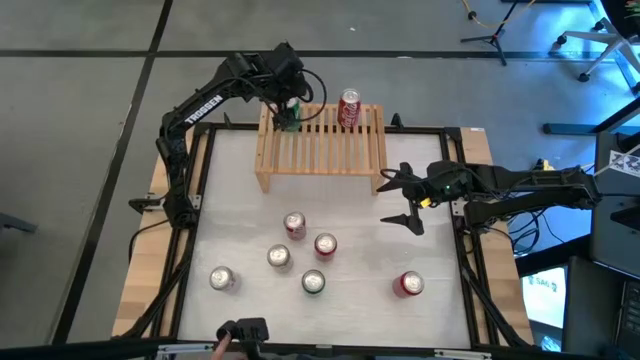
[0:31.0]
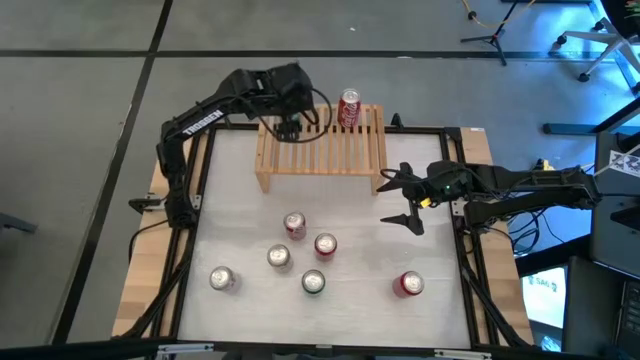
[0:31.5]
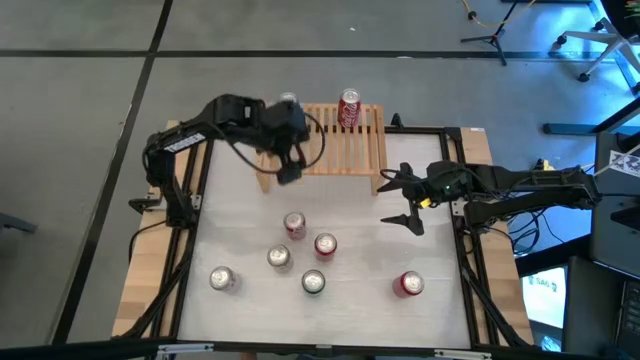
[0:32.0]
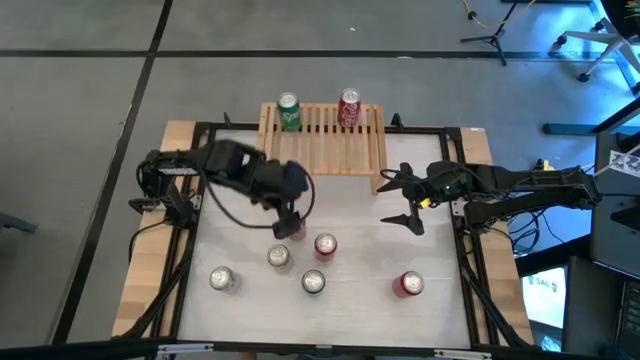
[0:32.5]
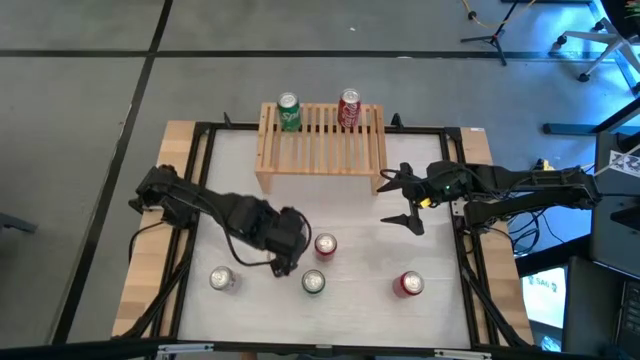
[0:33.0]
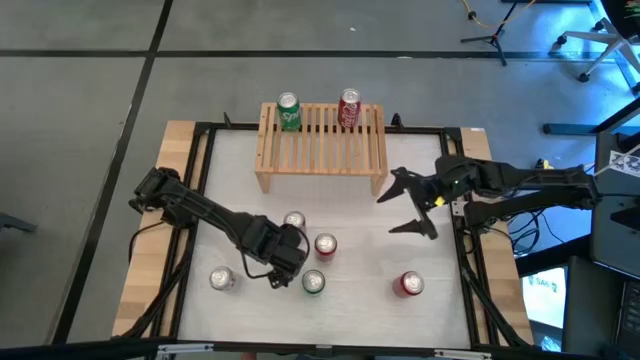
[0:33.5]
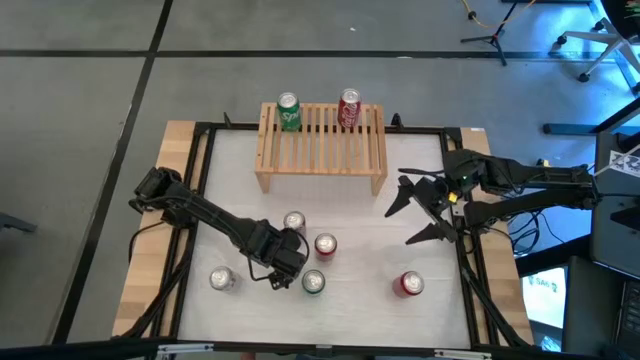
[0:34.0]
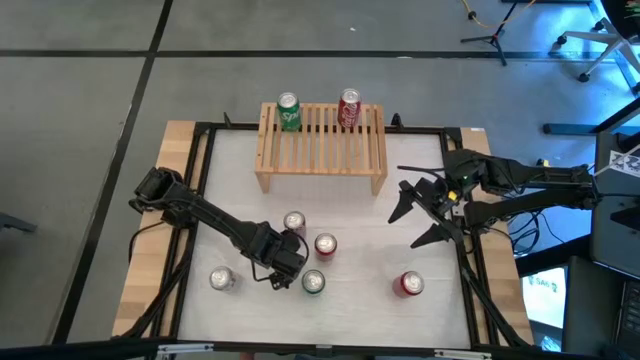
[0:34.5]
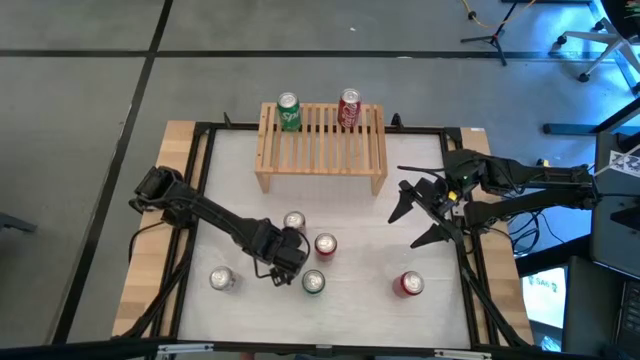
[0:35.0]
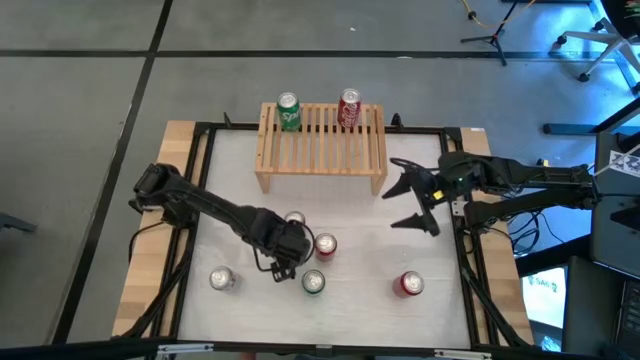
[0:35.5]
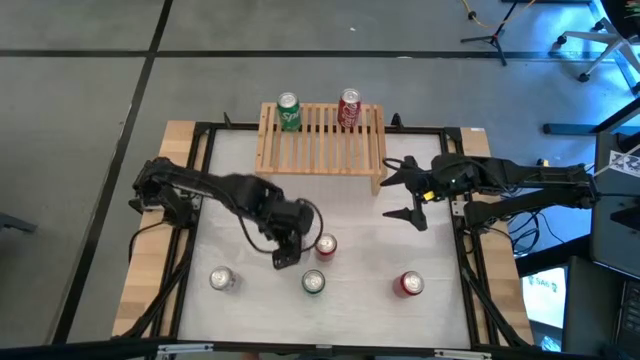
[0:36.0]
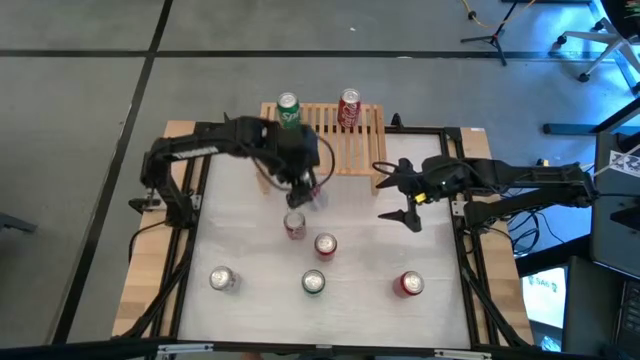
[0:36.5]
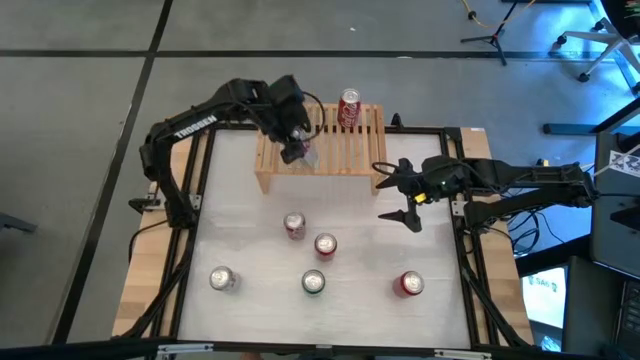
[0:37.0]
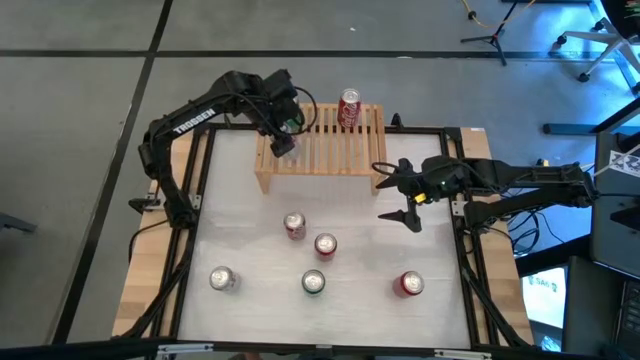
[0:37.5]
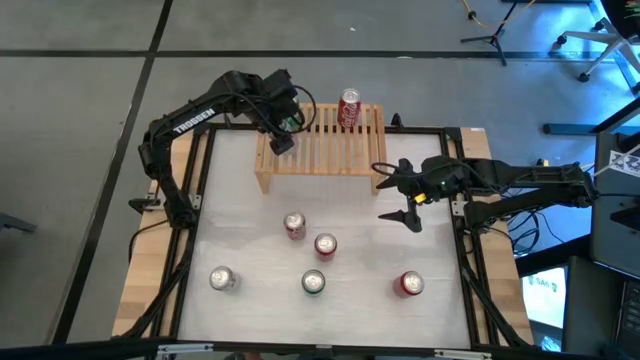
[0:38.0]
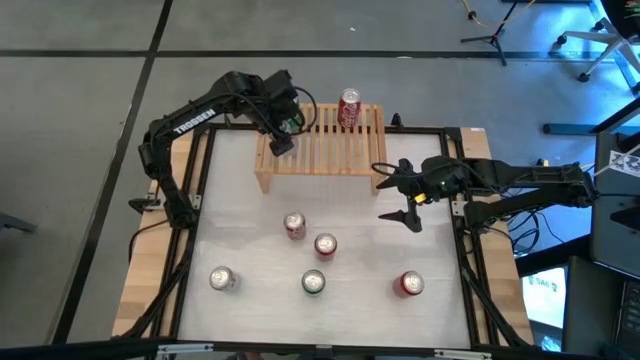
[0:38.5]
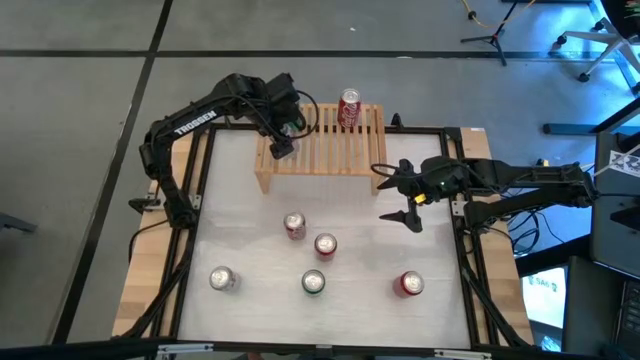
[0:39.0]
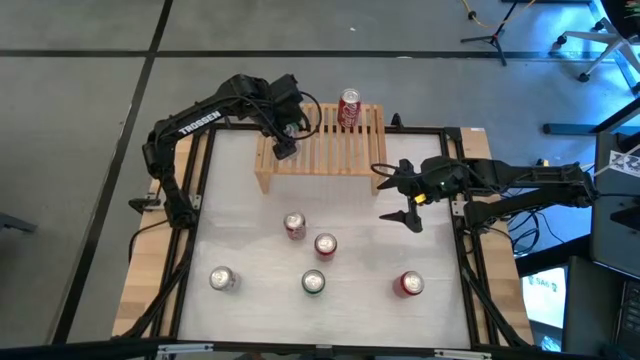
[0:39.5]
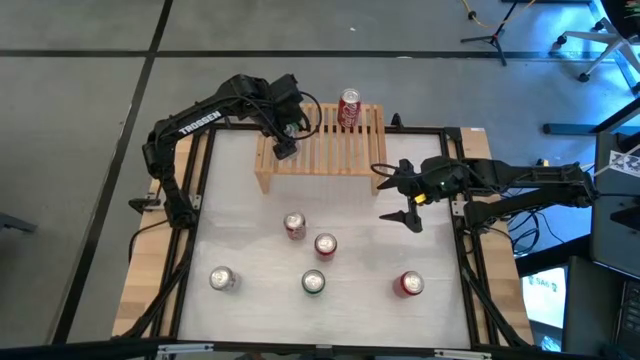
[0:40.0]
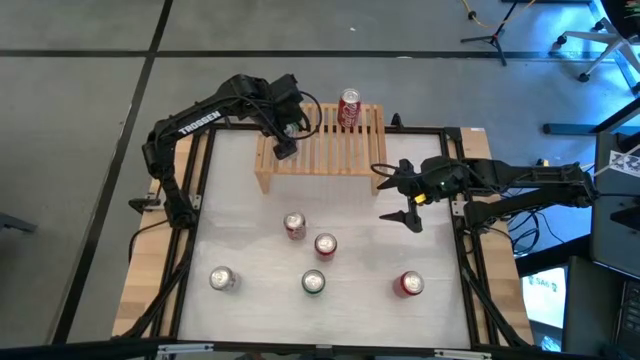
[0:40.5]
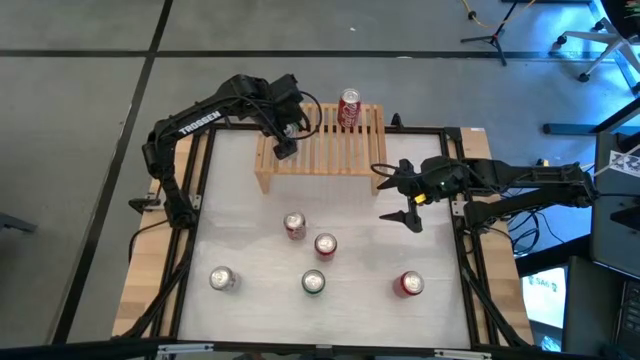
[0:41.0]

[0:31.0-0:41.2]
Task: Place canned beverage on shelf
Put the right silver/red soda can on the shelf aligned with the green soda can

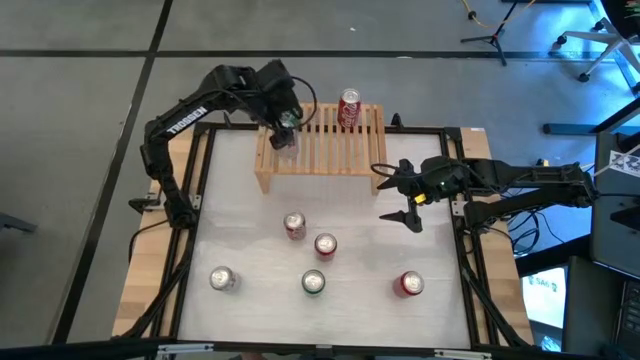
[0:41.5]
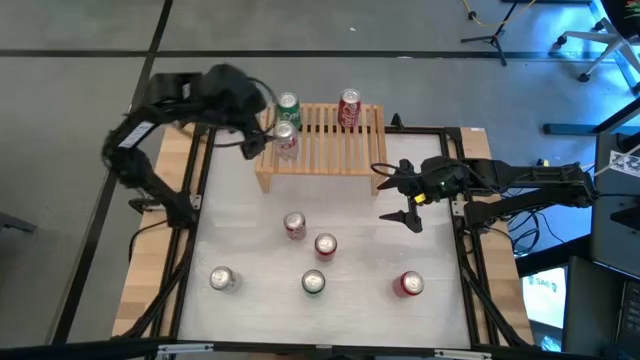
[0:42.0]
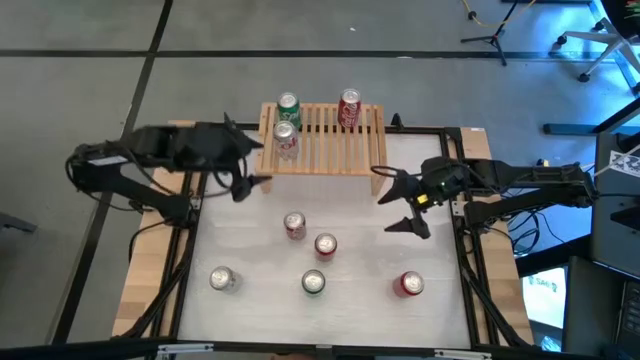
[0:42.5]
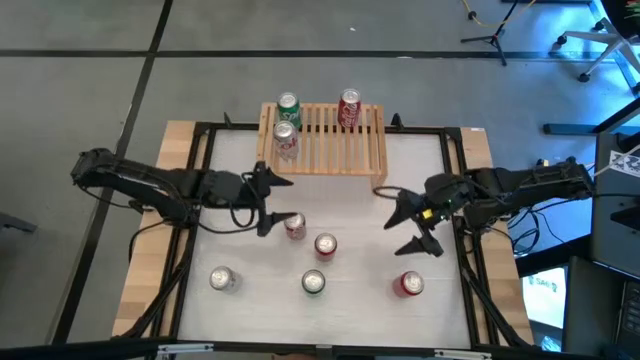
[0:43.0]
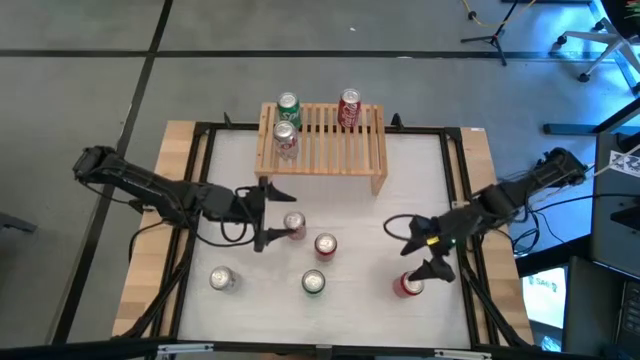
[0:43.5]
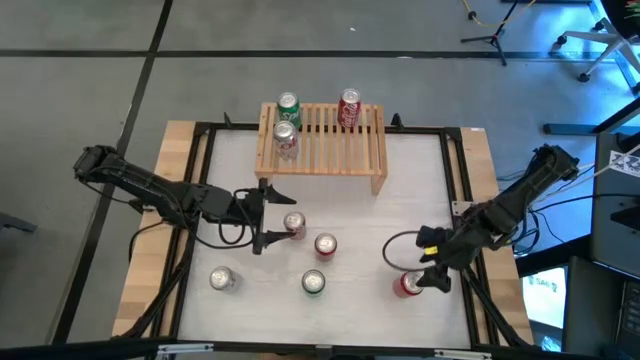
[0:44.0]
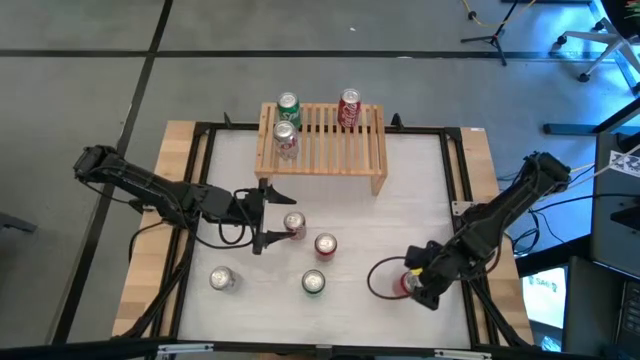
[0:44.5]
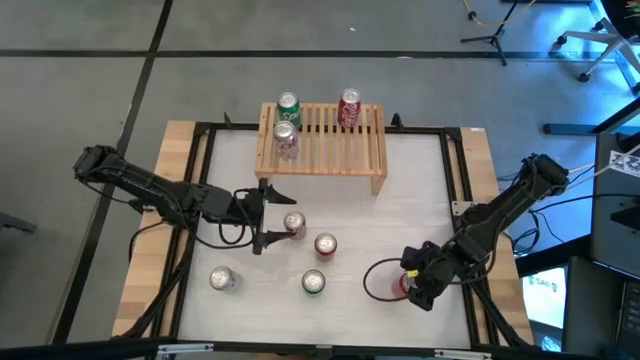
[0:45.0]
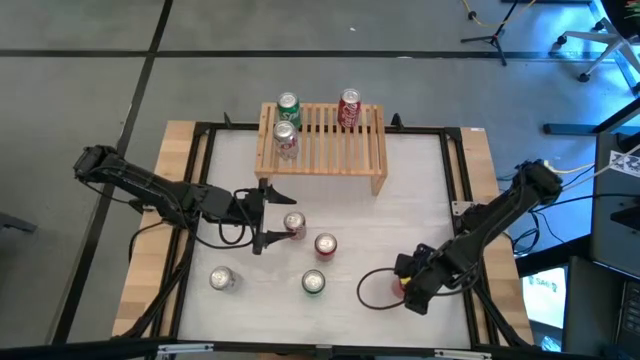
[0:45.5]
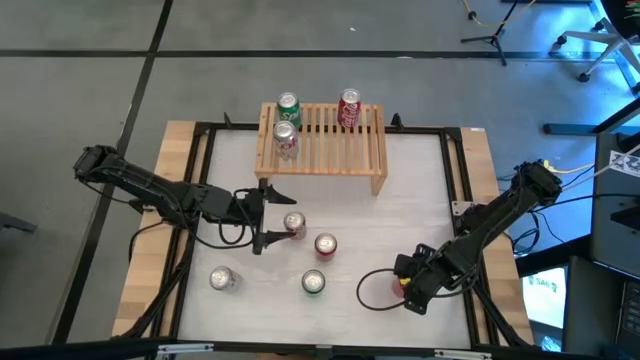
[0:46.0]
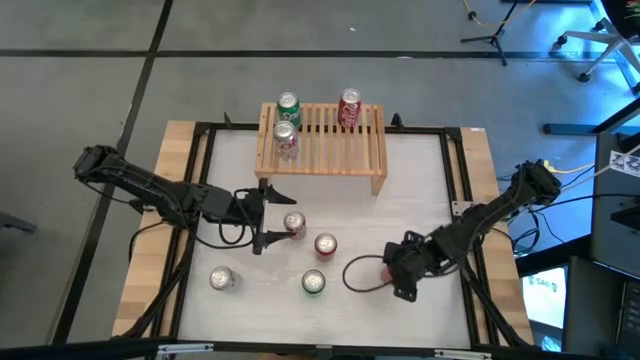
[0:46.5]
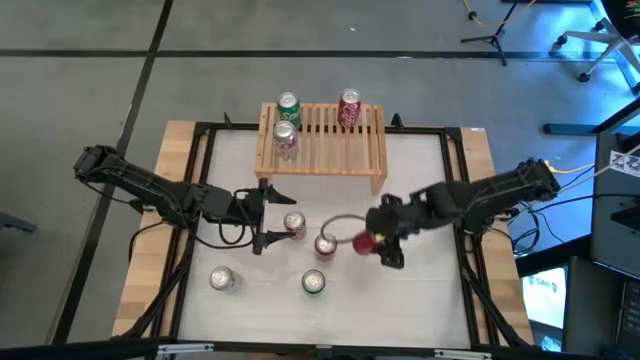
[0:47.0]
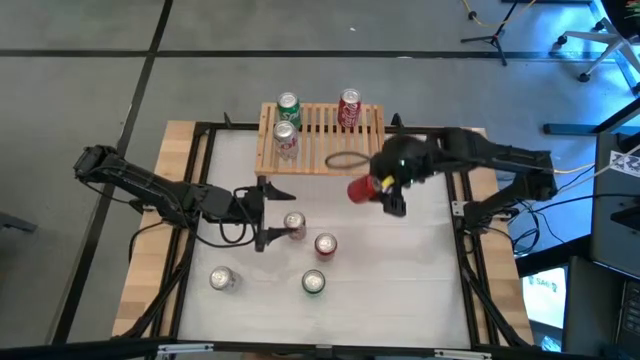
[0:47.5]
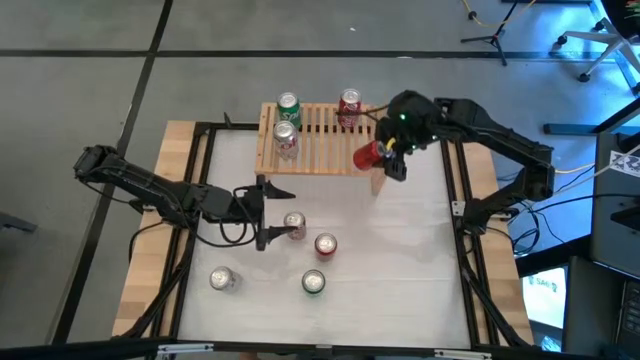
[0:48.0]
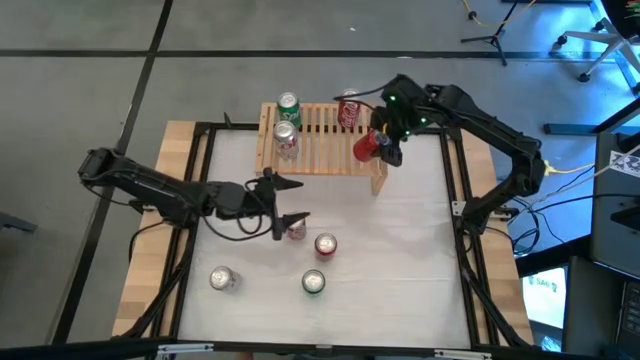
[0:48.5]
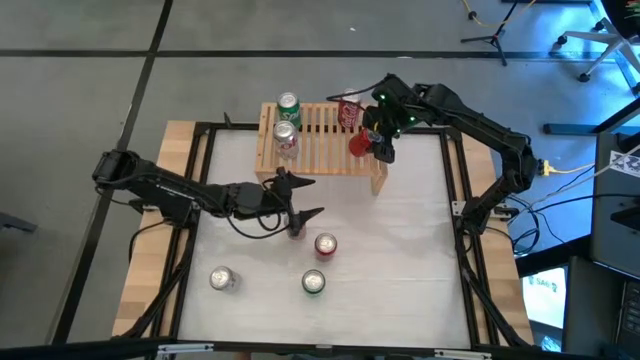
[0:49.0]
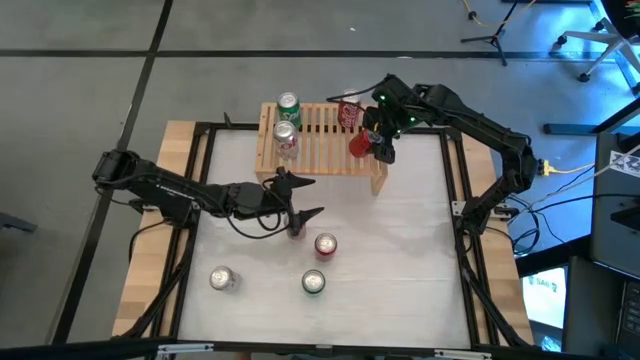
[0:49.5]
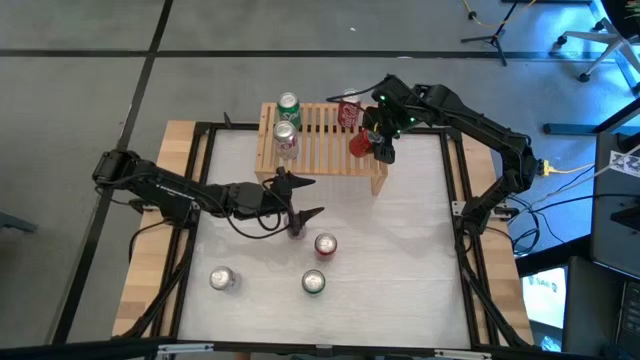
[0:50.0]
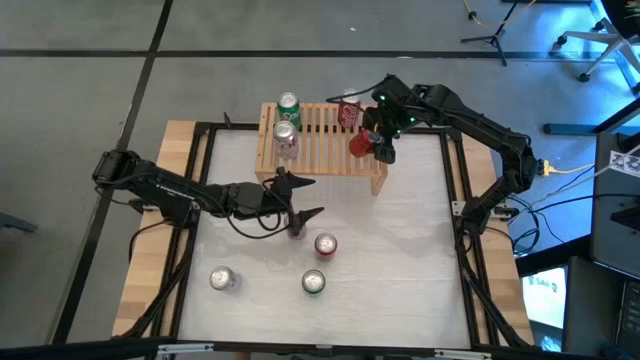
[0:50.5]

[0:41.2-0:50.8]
Put the bottom red/black soda can on the shelf aligned with the red/white soda can

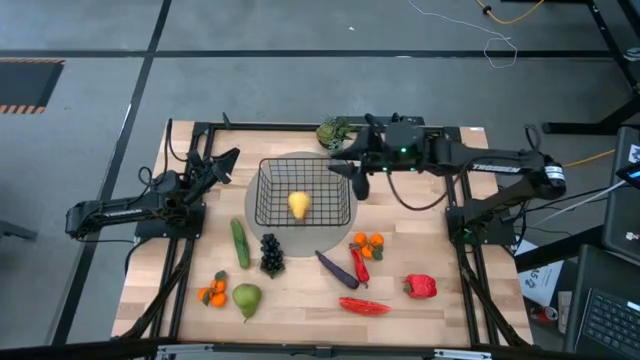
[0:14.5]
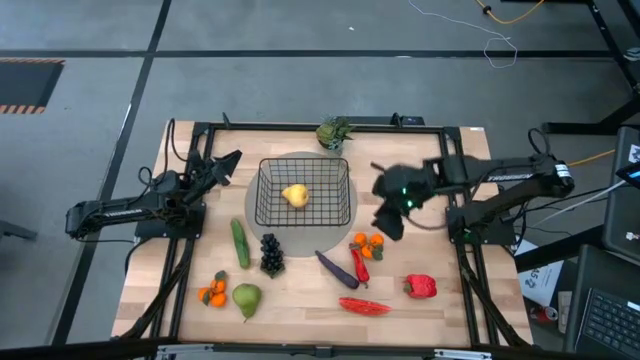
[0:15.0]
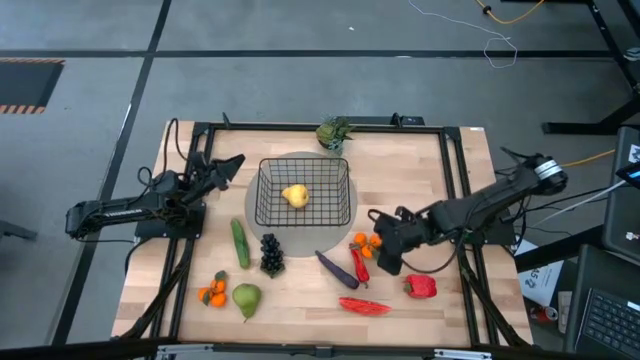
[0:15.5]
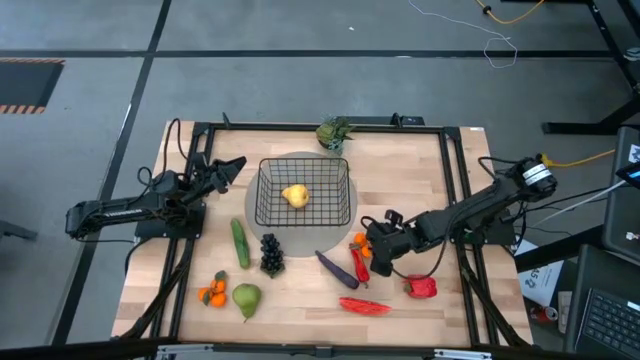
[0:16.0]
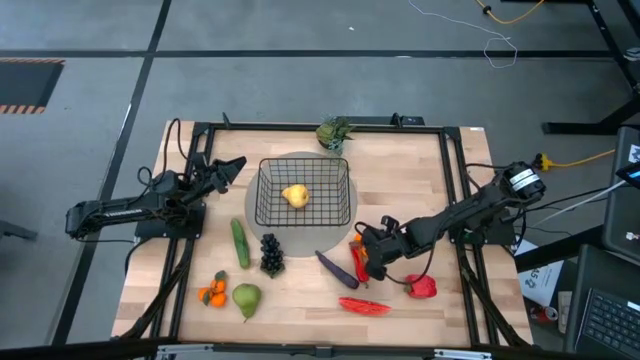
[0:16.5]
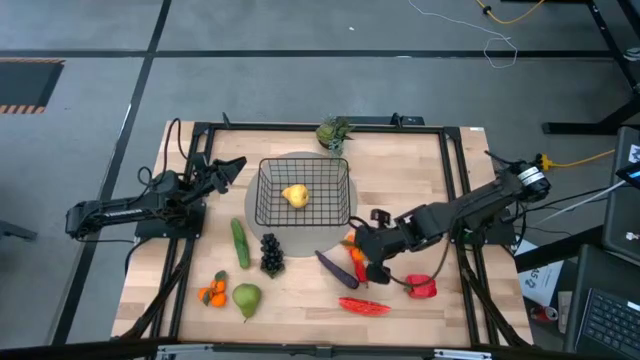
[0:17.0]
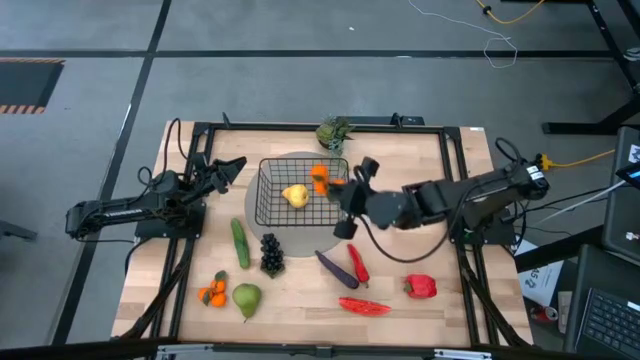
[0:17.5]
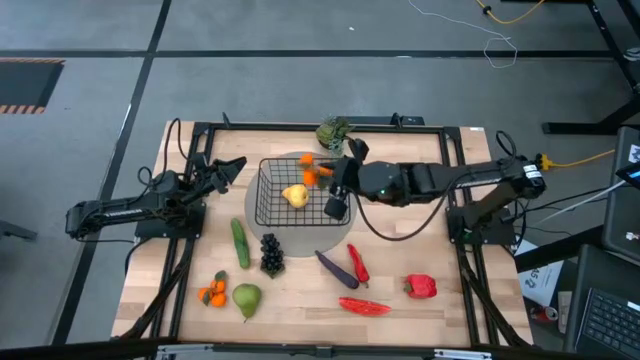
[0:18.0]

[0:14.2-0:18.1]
Task: Build produce basket
Put the right oranges into the black wire basket
